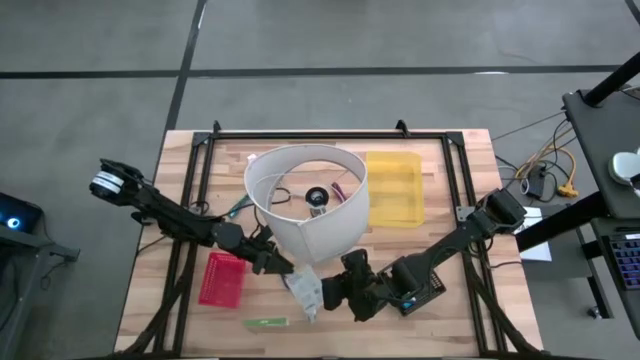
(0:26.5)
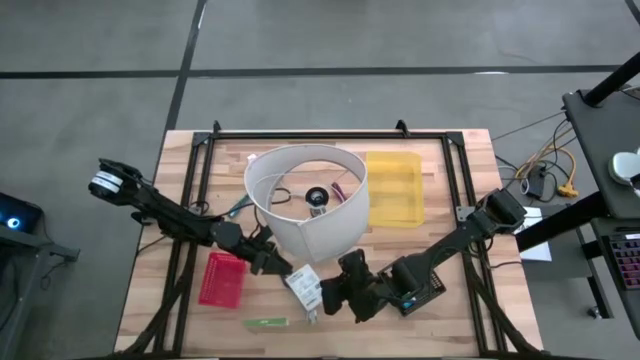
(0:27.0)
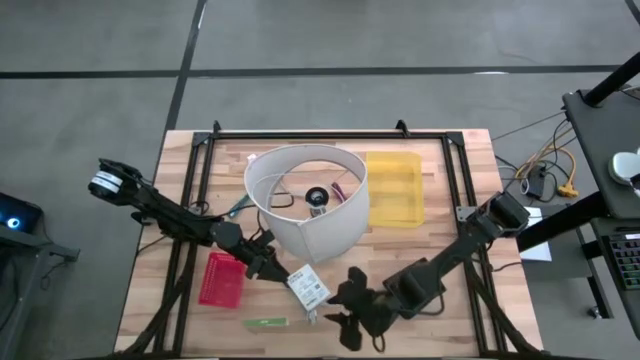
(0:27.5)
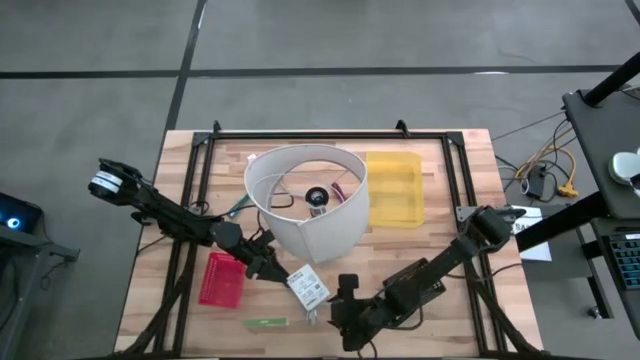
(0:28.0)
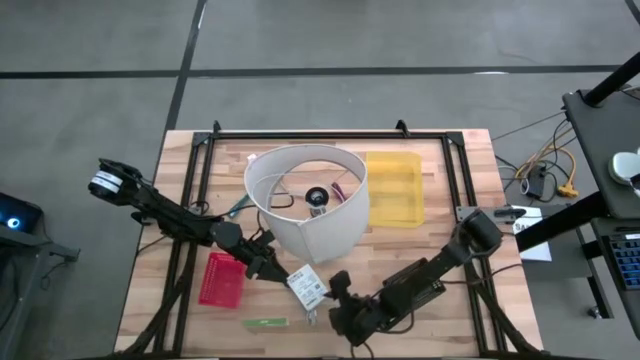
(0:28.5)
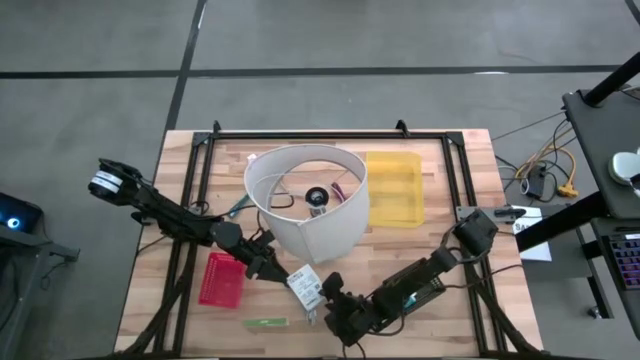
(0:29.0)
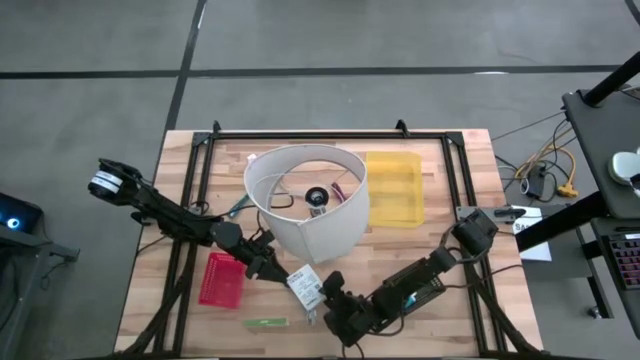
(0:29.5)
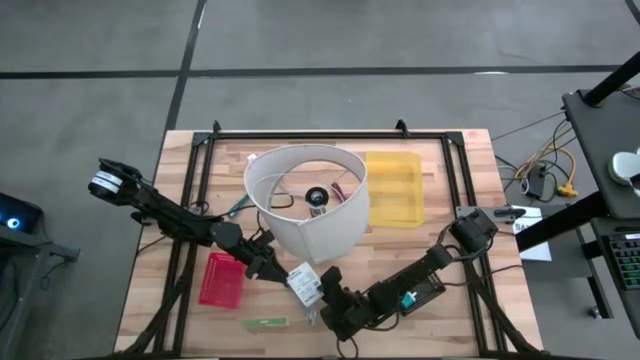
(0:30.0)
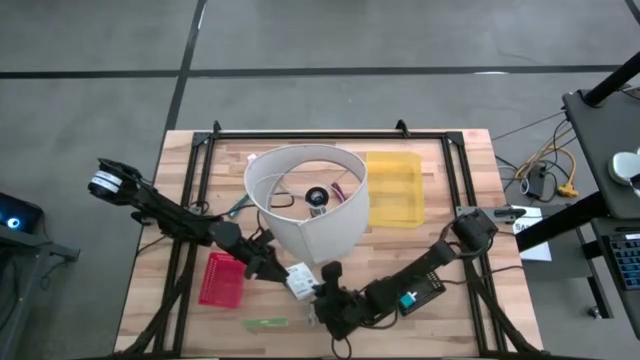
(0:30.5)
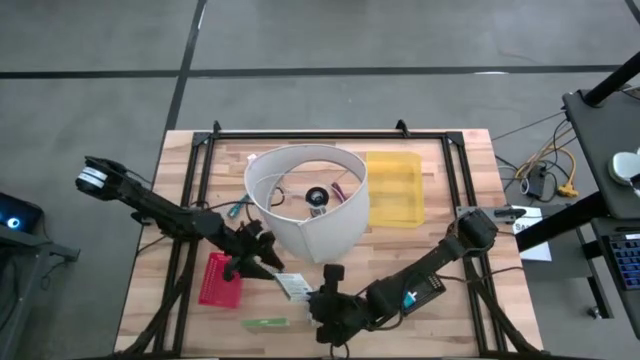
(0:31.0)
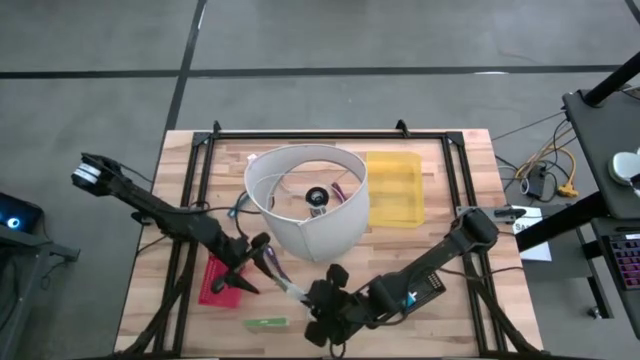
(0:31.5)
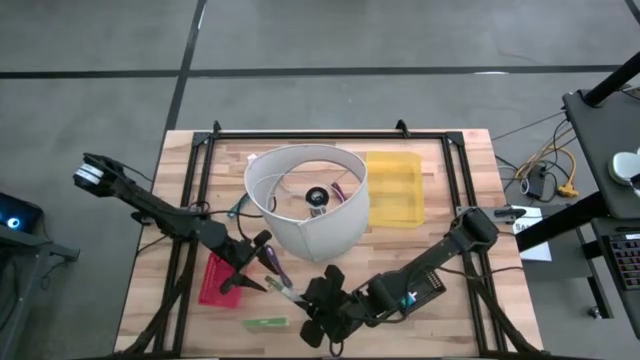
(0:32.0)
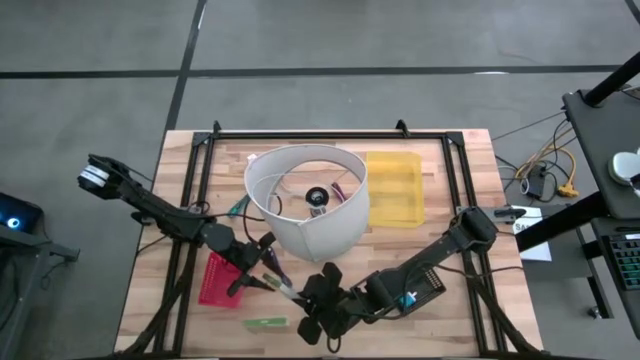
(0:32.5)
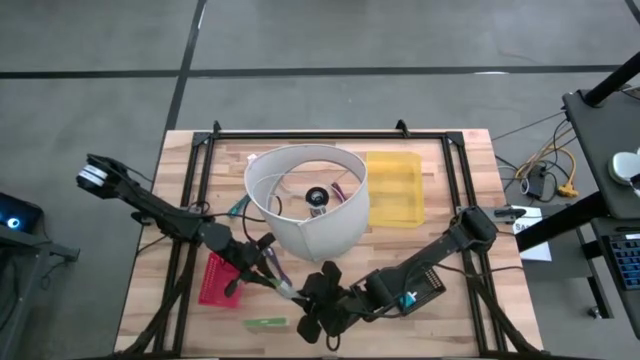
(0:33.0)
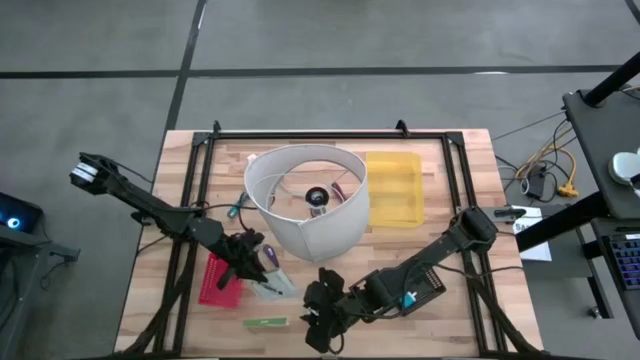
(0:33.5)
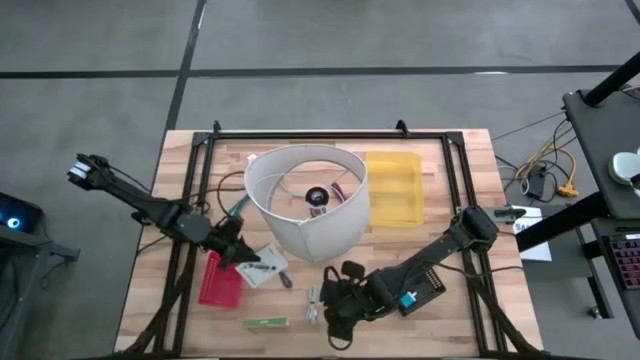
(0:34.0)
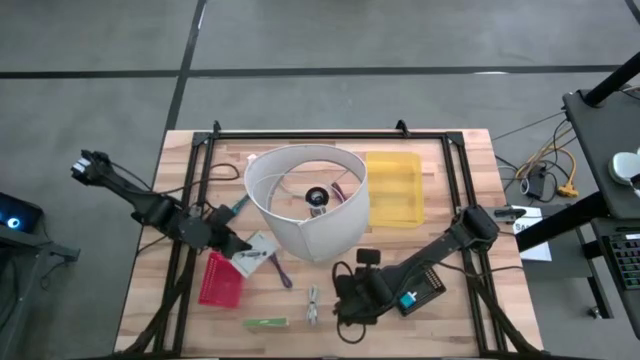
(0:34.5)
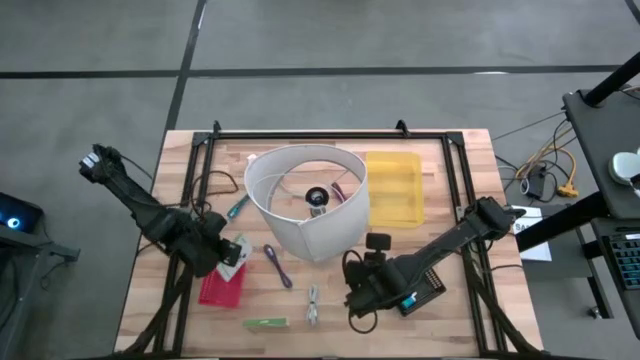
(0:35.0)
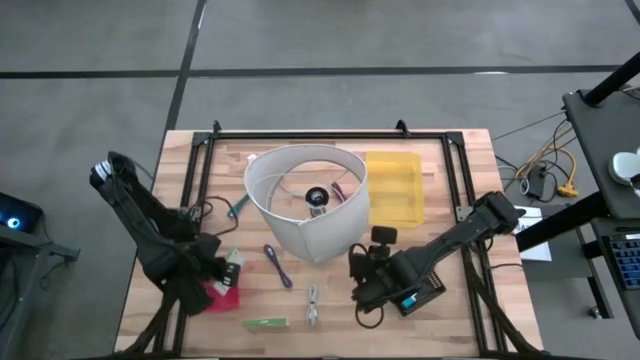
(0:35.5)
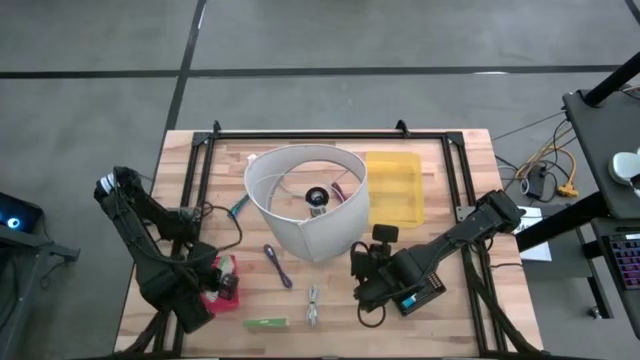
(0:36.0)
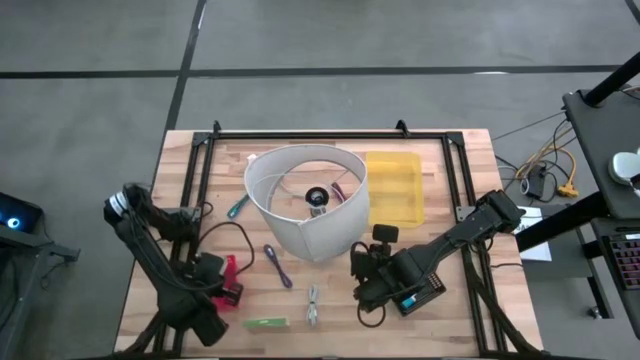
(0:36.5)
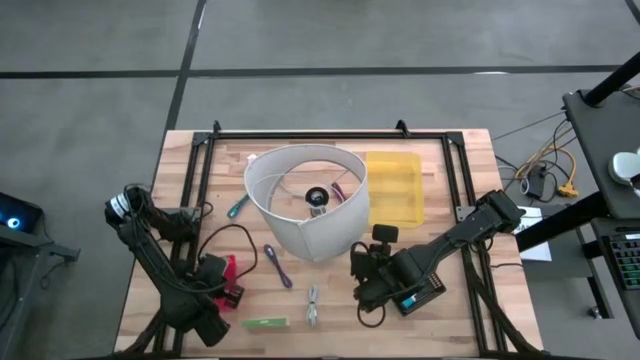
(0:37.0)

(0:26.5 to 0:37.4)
Task: Pick and place items into bin
Put the right card reader box into the red bin

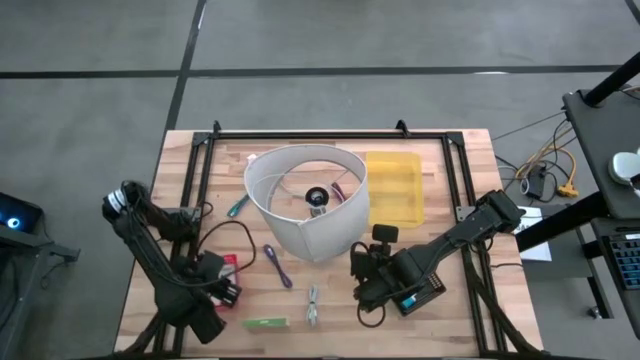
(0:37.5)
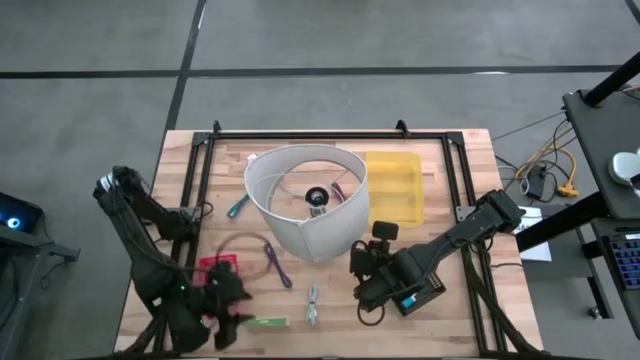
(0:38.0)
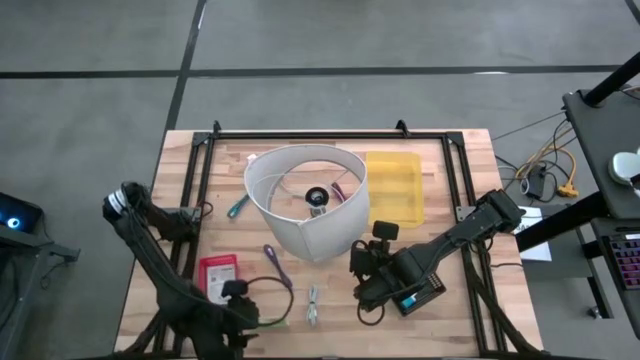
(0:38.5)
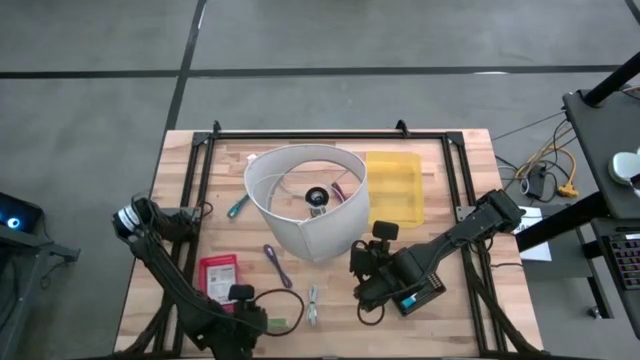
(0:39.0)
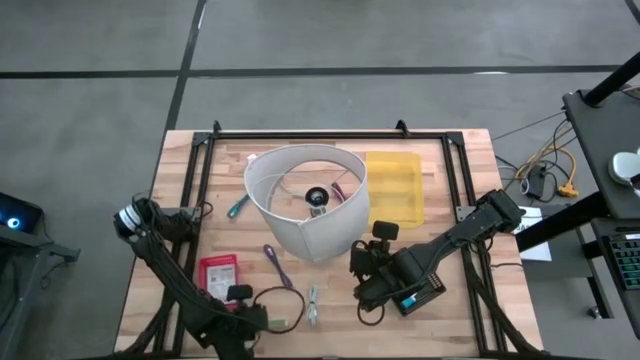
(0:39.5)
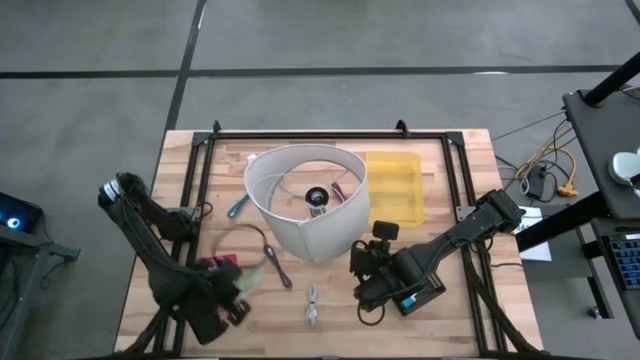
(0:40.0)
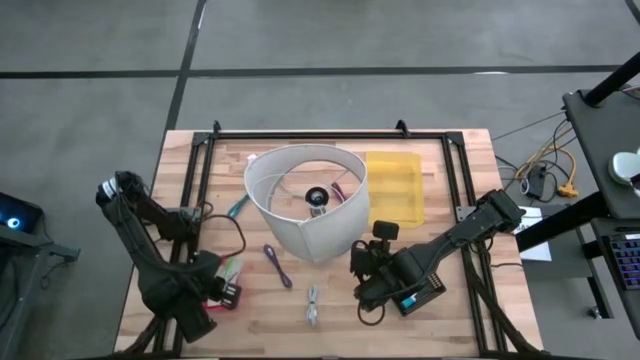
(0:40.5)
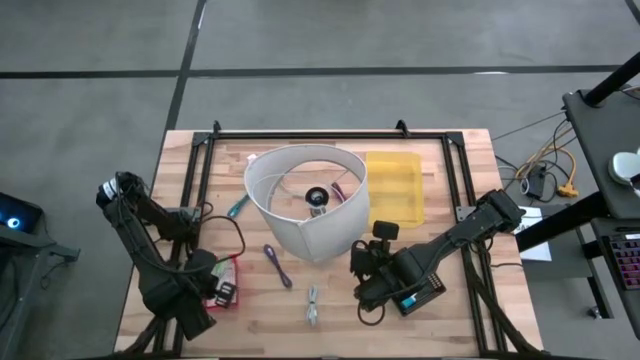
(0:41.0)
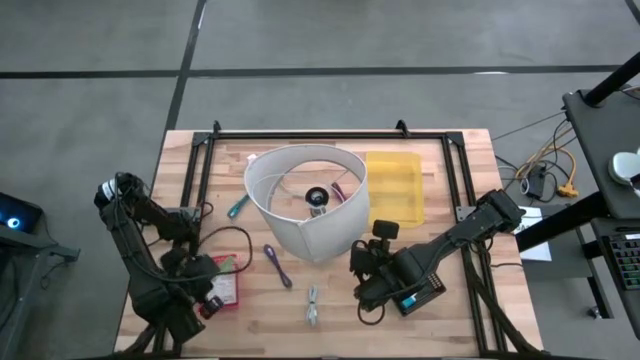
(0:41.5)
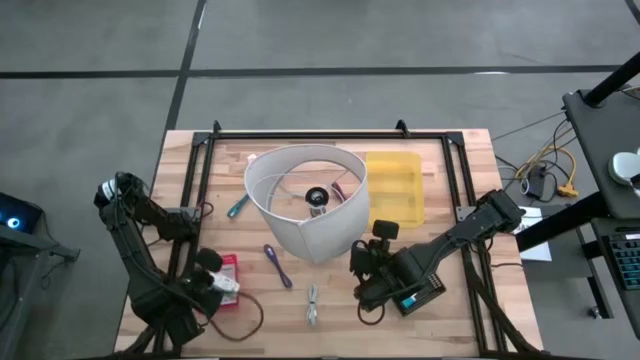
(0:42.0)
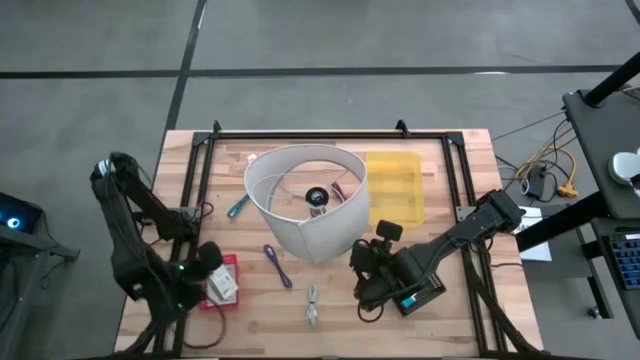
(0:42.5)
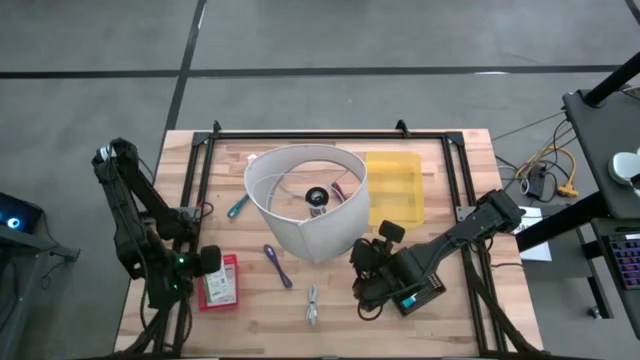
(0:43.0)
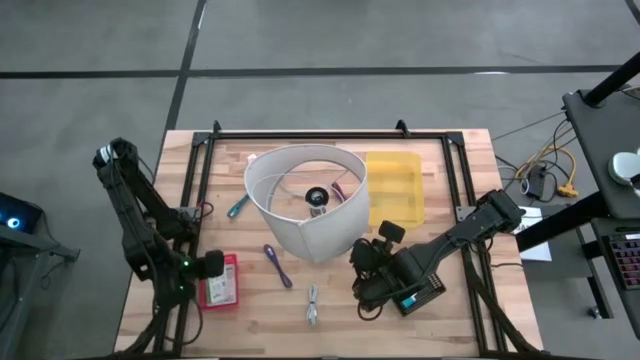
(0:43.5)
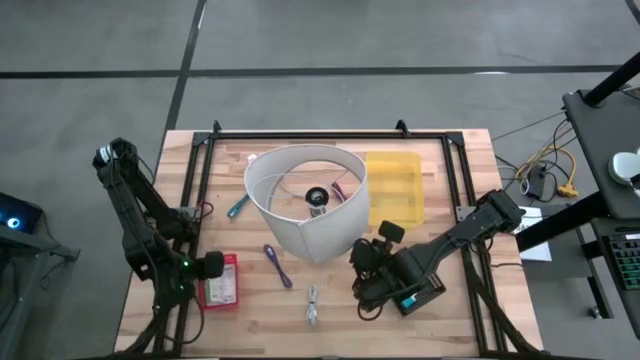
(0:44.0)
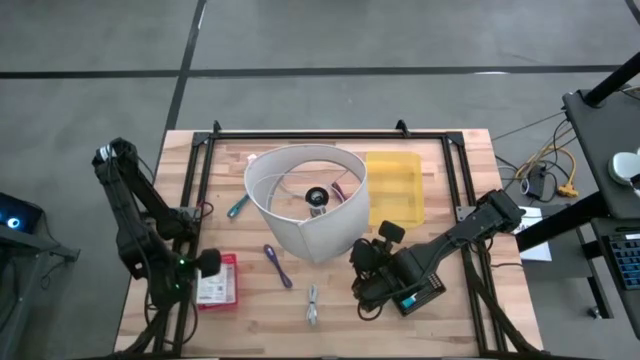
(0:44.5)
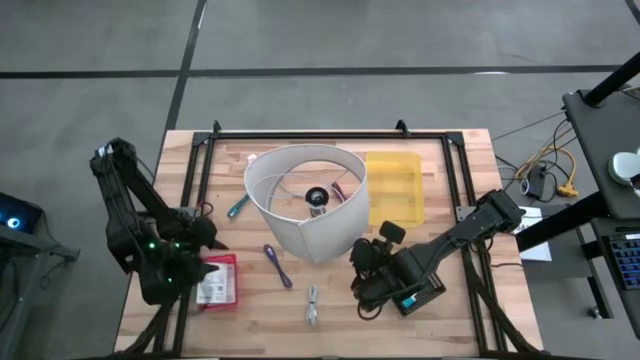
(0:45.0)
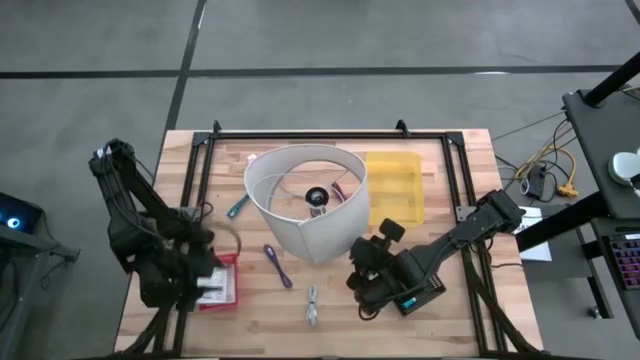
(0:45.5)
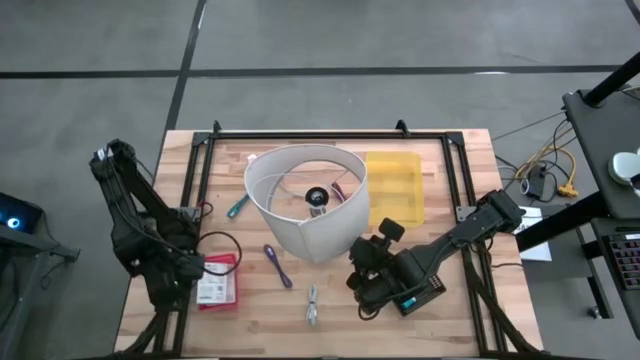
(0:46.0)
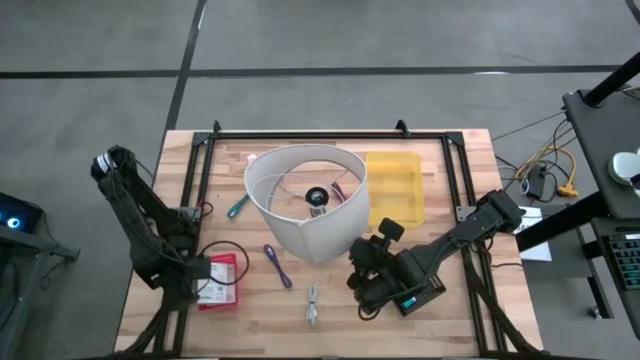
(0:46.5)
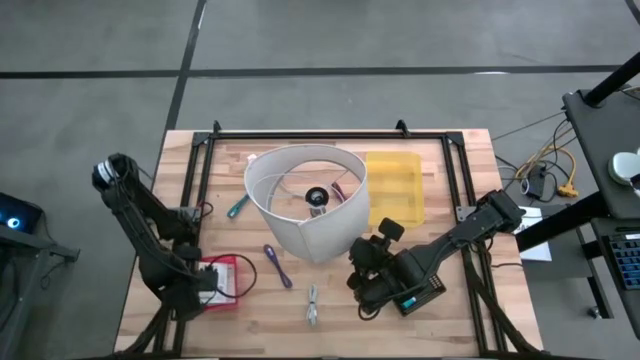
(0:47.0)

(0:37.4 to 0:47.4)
Put the card reader box into the red bin
